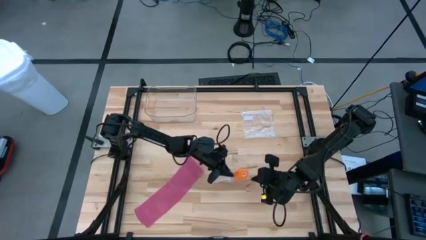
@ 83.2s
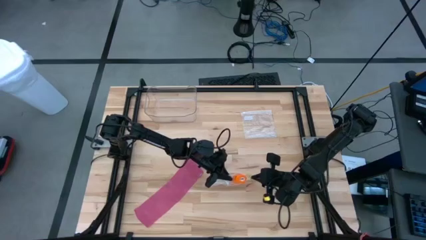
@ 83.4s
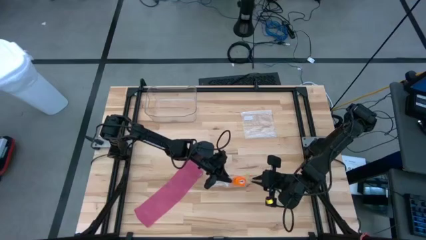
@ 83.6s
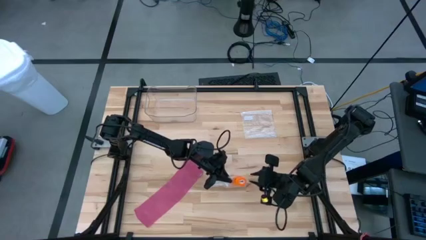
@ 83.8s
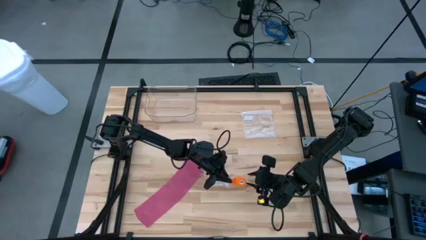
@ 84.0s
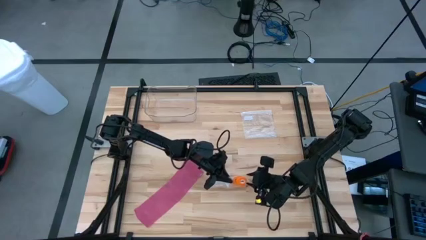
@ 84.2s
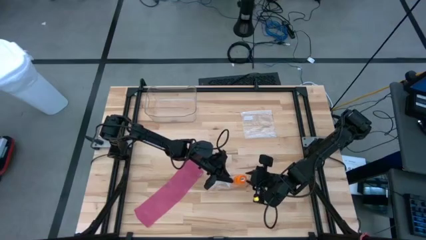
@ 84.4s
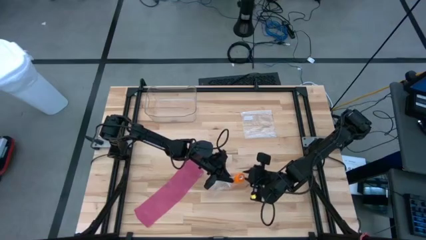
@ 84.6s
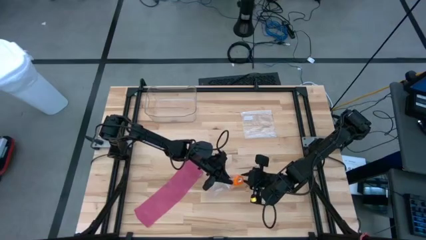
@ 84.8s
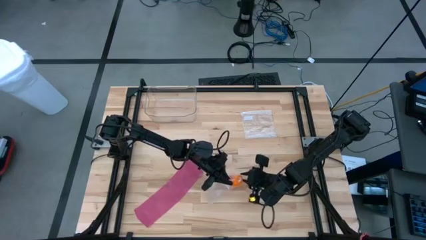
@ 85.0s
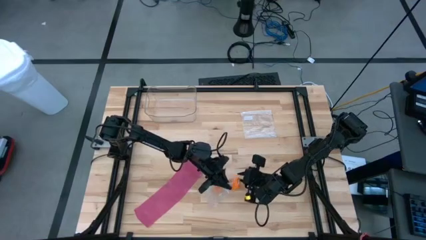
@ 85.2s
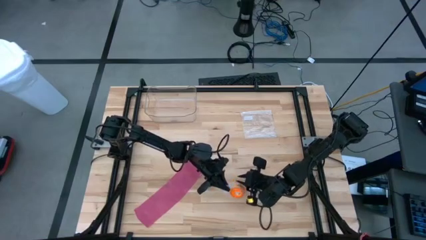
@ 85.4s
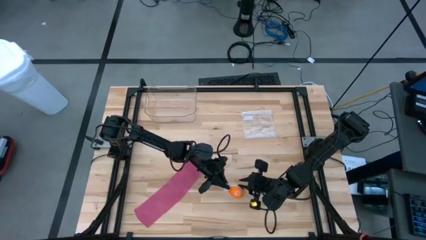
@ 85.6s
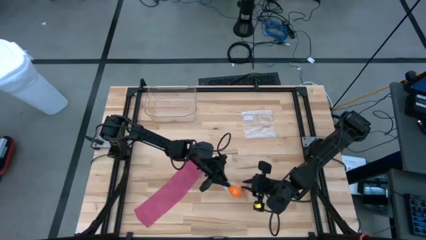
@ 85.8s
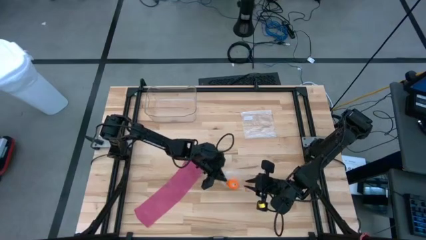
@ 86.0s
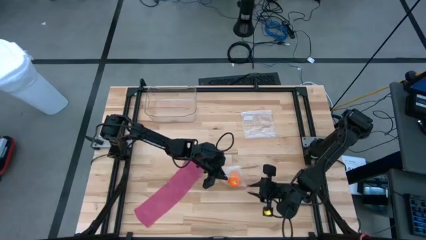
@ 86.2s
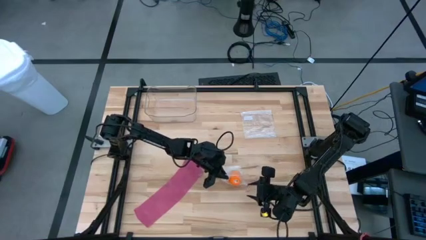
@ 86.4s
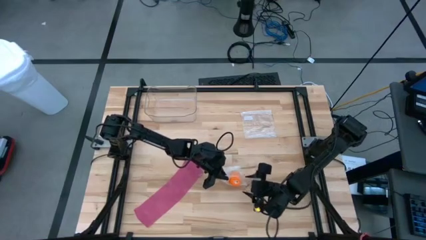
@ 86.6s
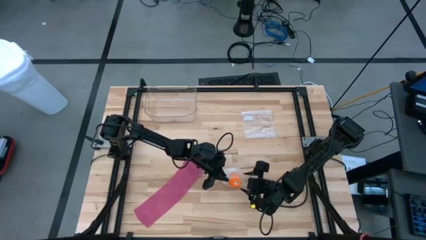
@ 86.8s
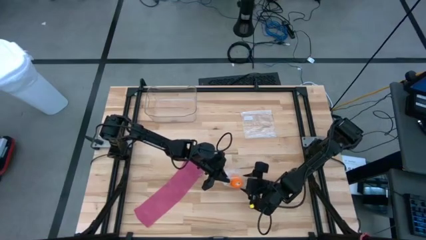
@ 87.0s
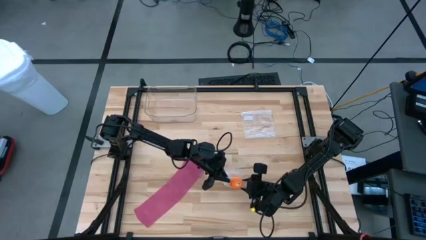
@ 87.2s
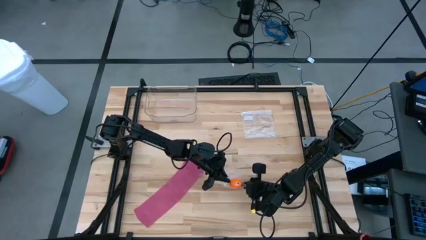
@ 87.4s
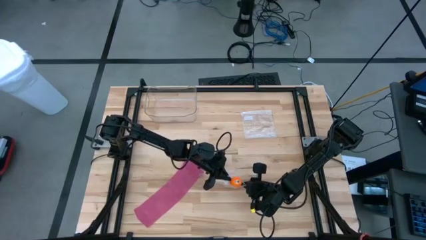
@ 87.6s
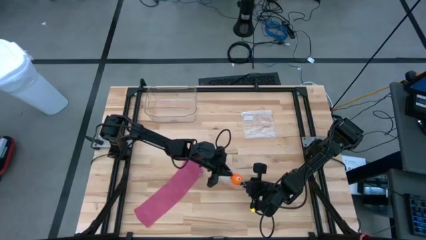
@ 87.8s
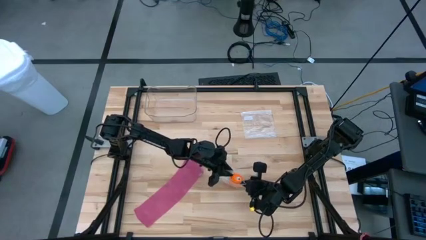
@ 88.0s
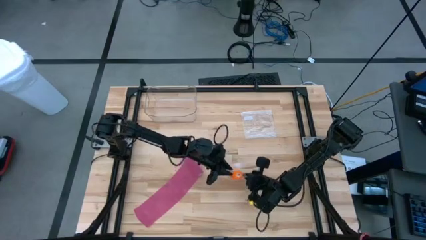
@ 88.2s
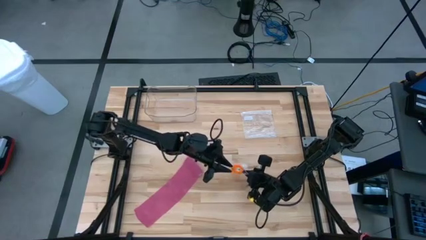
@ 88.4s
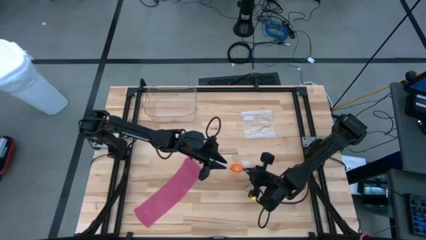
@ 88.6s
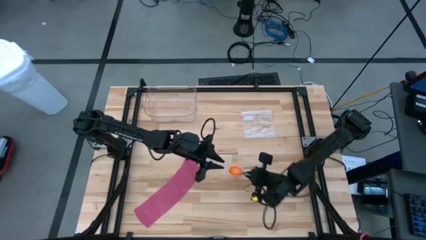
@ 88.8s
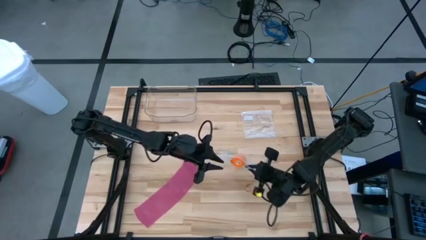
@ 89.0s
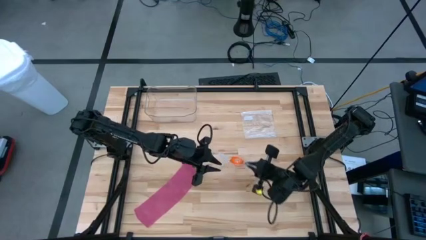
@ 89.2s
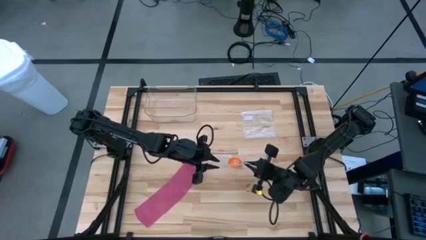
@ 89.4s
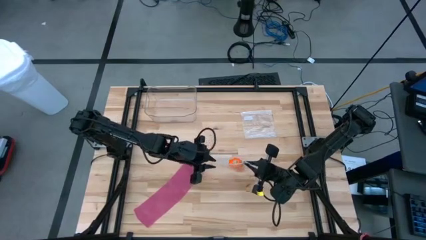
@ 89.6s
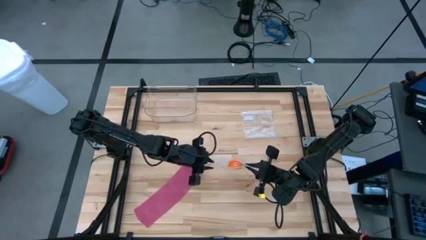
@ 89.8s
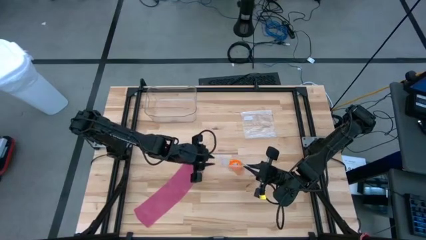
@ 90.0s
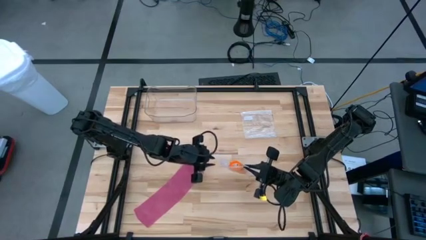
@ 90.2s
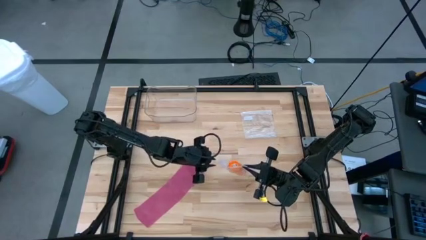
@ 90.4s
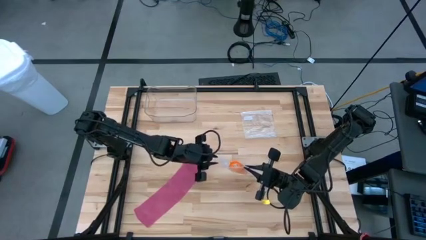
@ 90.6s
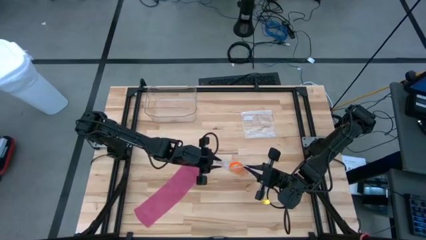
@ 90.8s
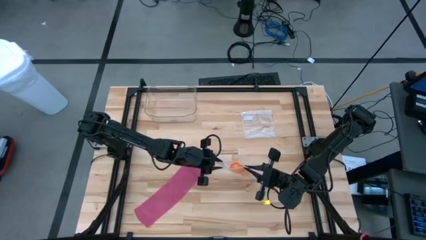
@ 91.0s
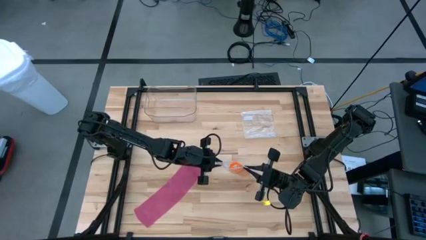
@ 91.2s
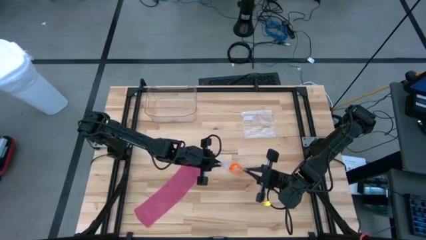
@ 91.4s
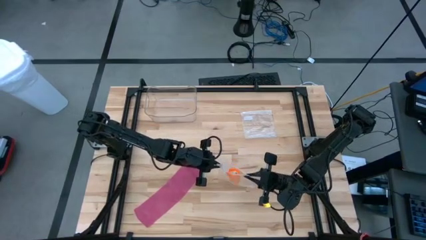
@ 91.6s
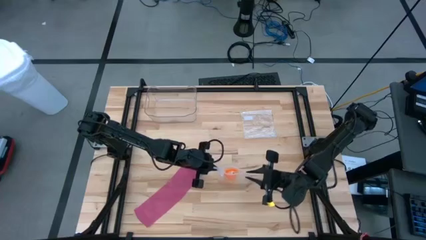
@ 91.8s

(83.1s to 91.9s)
Task: Roll bandage
Put the rolled orange bandage into the transparent zip bag

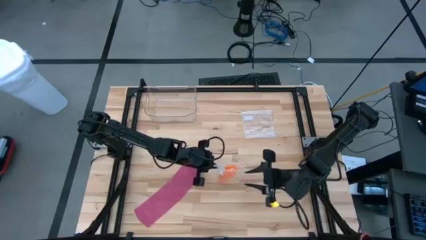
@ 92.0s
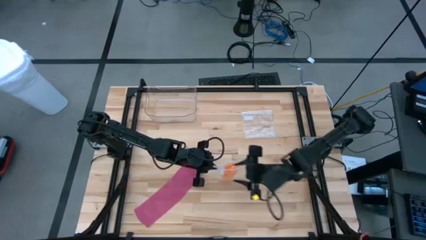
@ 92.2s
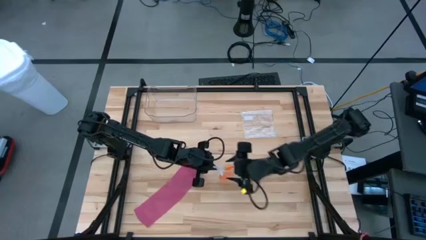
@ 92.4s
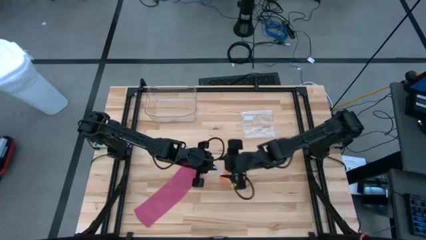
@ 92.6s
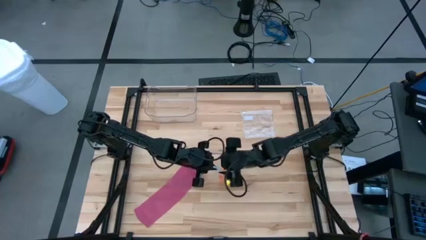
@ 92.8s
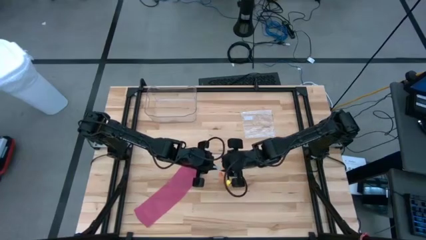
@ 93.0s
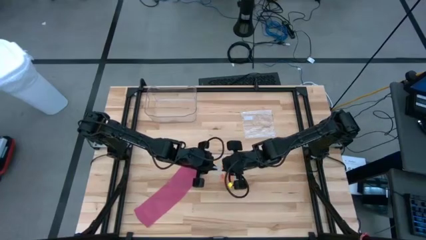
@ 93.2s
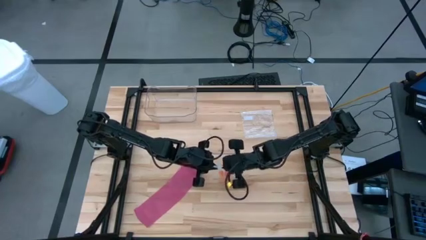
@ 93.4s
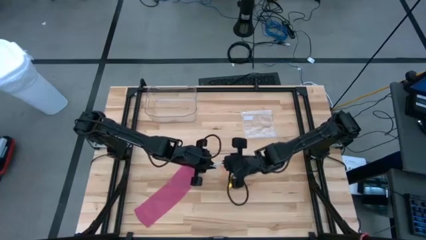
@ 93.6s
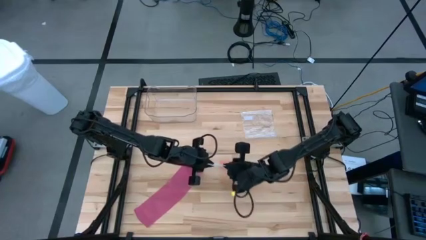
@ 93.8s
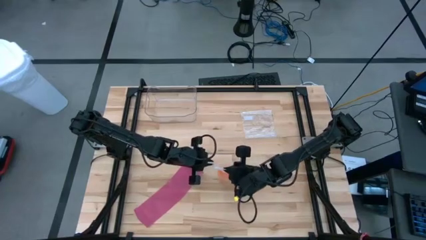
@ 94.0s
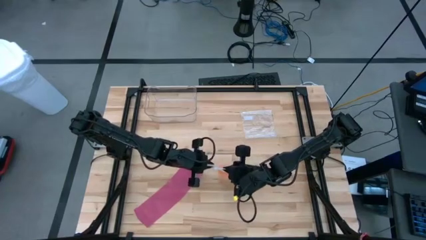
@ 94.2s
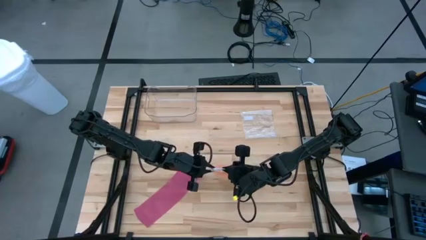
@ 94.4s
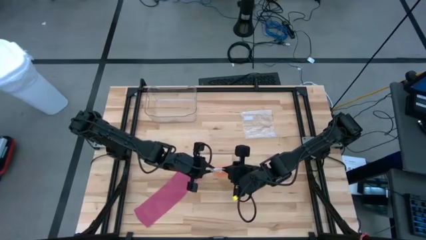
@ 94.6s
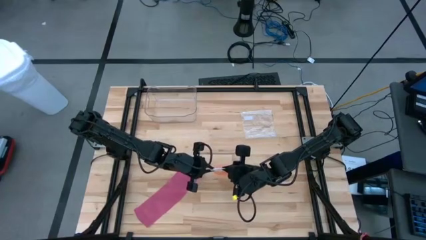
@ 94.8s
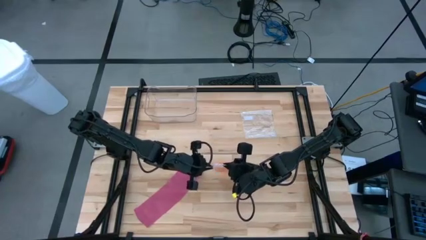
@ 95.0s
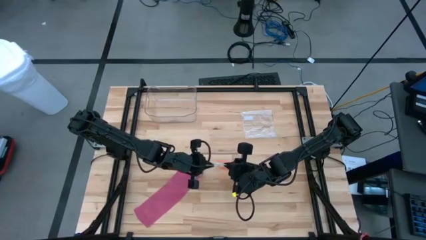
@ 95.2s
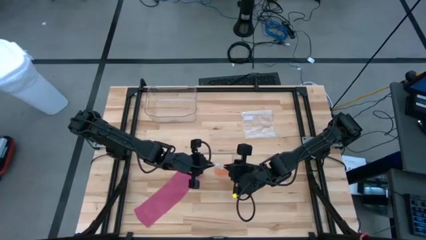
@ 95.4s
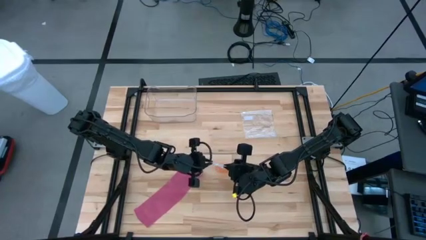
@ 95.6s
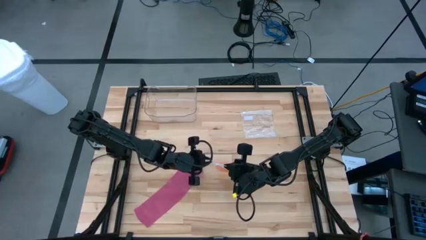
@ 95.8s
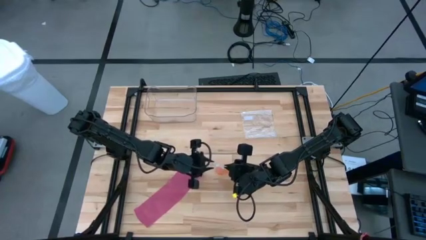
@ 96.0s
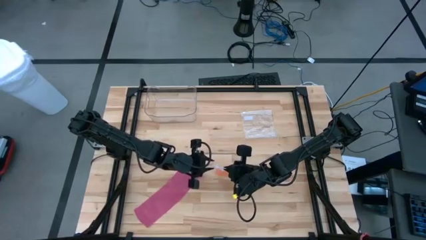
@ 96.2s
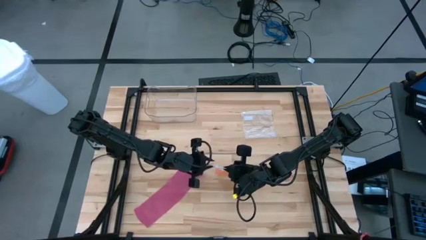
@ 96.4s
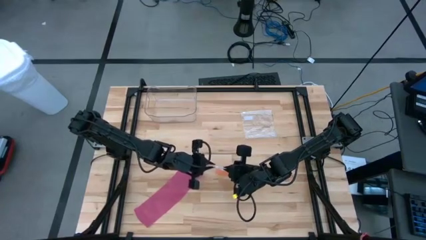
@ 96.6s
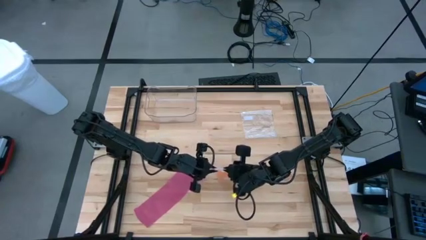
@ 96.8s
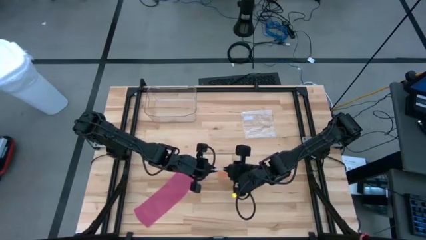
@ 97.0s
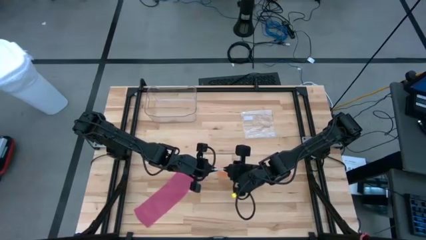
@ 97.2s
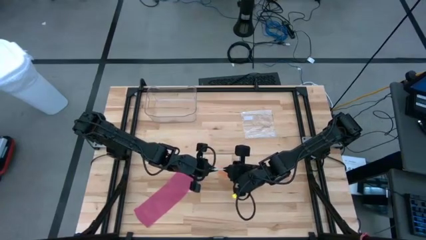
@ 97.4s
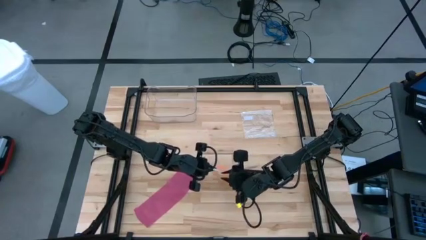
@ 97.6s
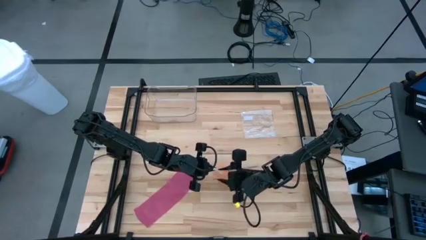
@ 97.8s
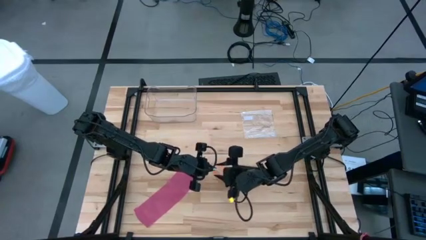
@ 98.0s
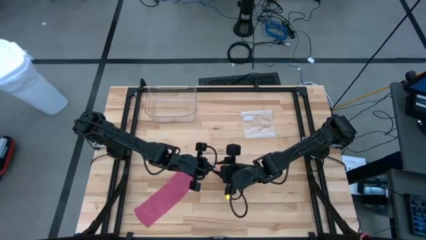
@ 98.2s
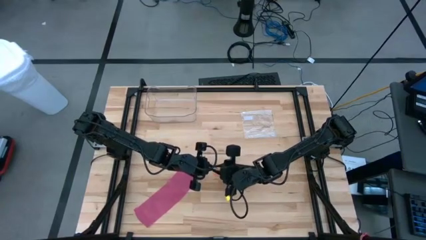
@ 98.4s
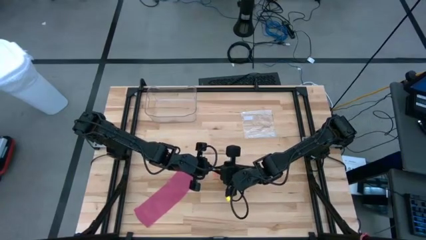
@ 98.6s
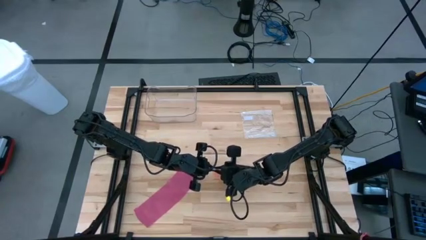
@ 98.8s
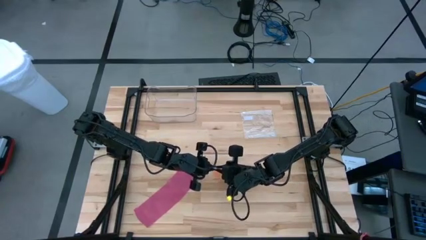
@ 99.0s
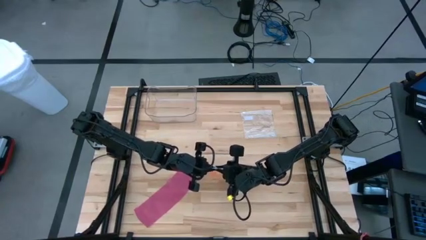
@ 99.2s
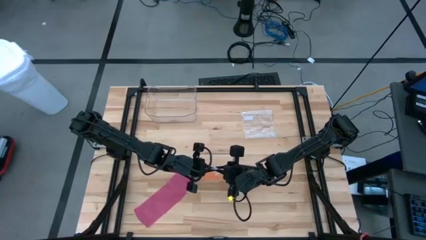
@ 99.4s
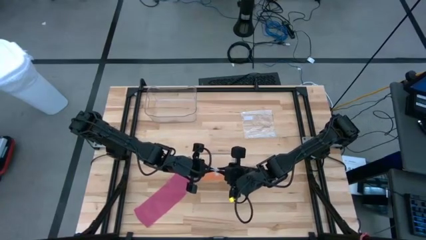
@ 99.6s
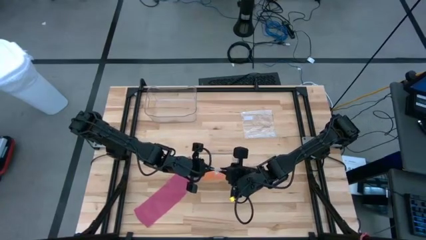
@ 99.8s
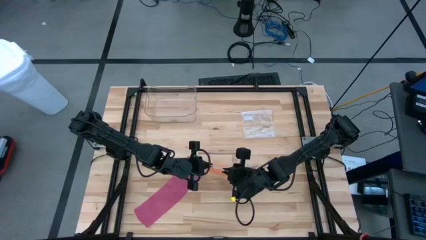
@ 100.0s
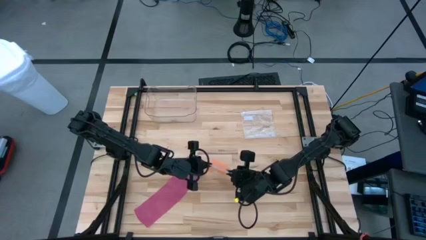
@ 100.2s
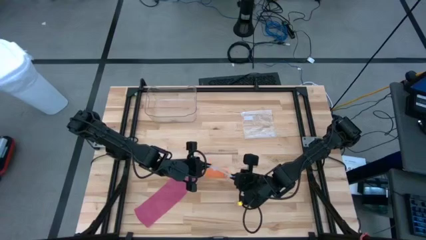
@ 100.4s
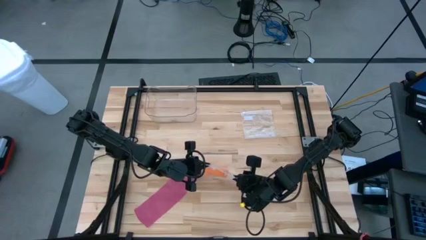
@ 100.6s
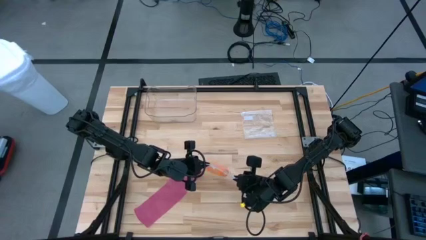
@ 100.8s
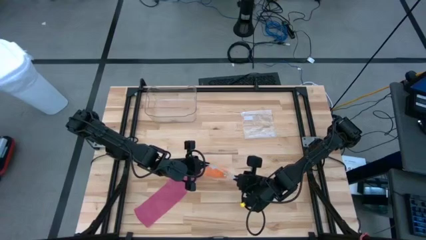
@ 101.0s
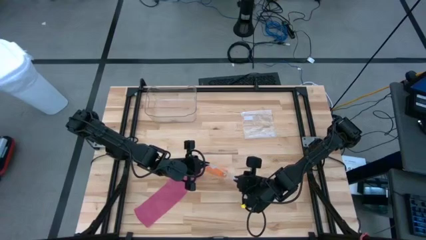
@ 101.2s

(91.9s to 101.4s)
Close the transparent zip bag
